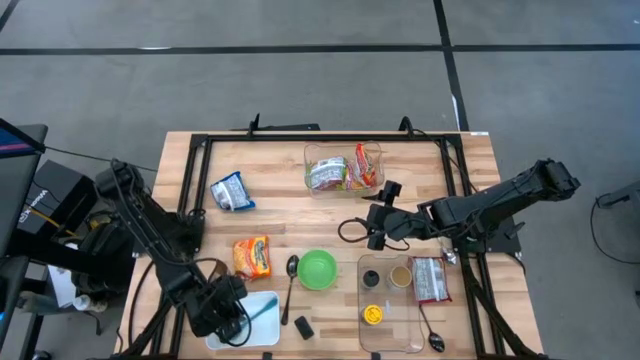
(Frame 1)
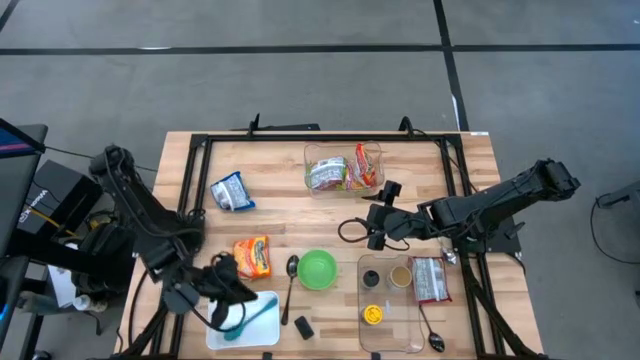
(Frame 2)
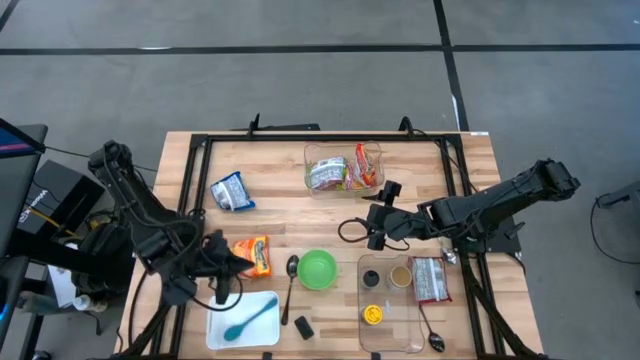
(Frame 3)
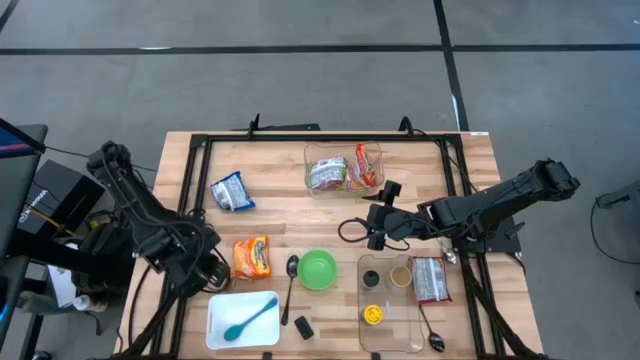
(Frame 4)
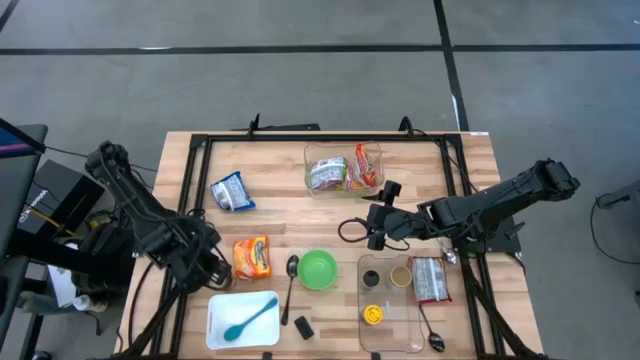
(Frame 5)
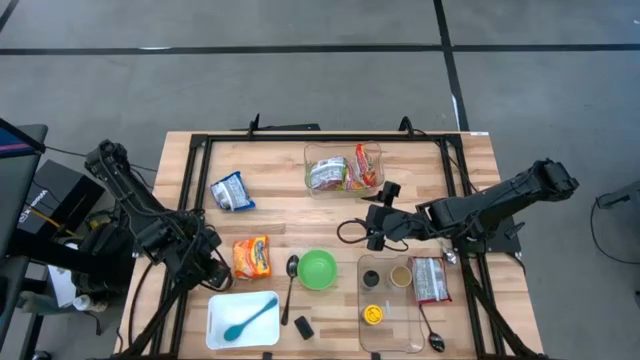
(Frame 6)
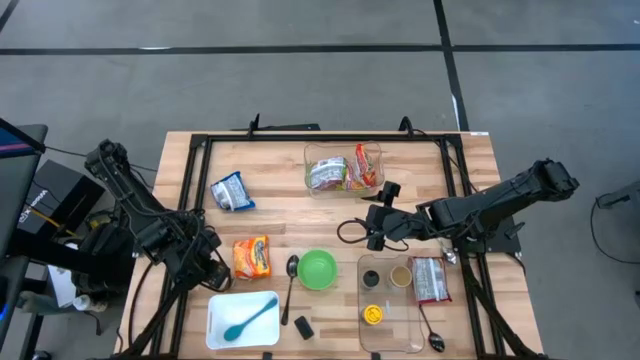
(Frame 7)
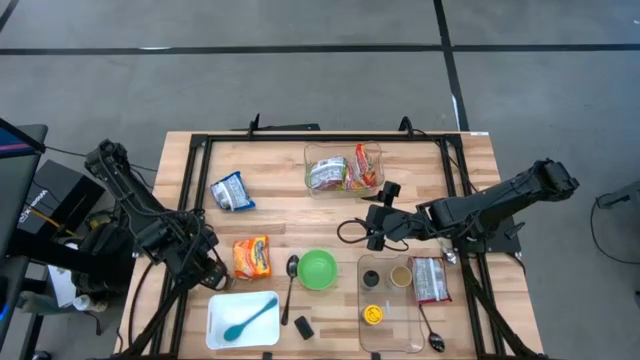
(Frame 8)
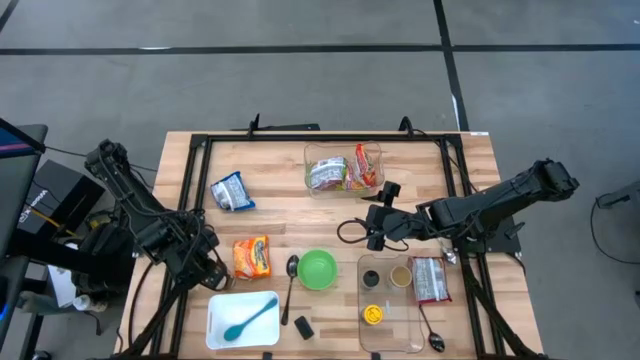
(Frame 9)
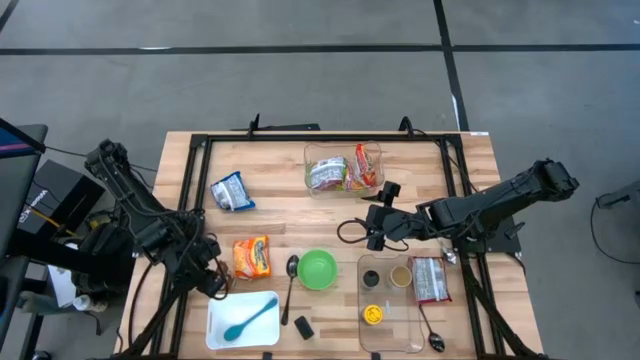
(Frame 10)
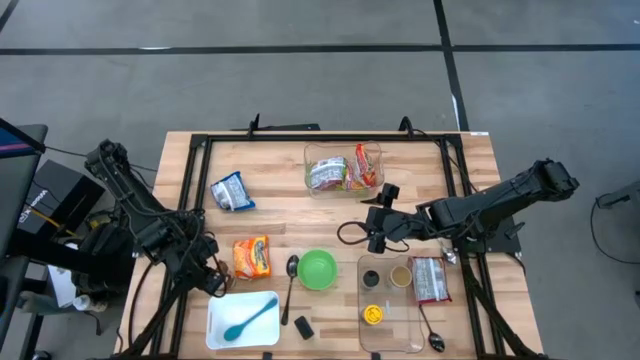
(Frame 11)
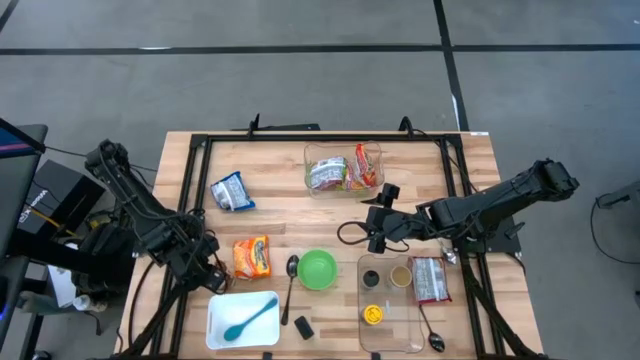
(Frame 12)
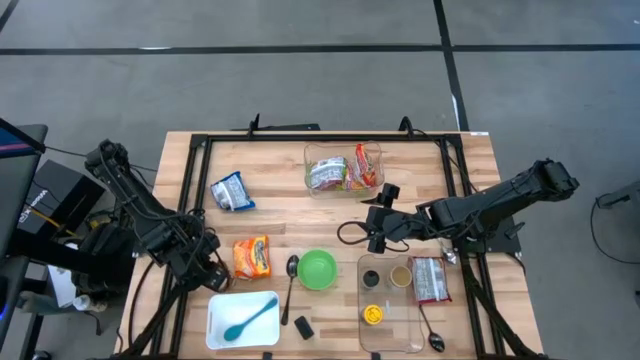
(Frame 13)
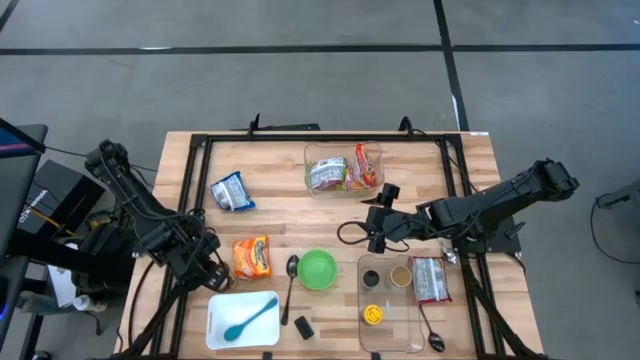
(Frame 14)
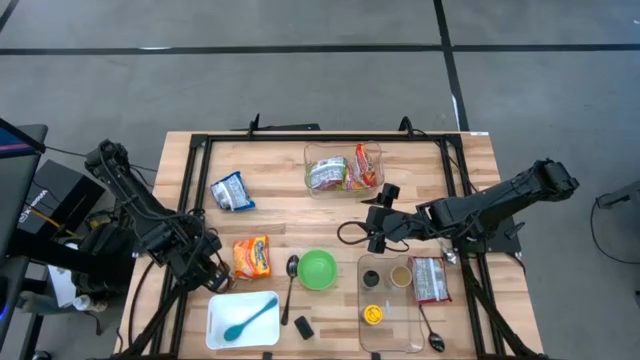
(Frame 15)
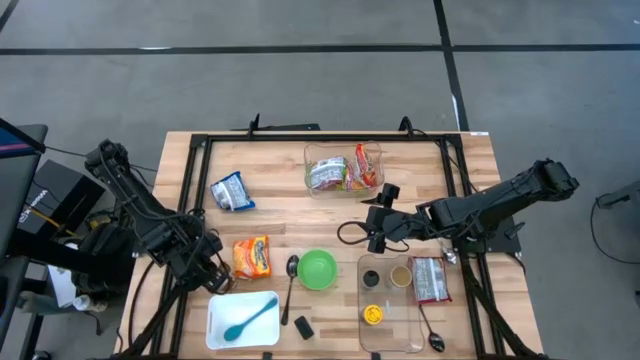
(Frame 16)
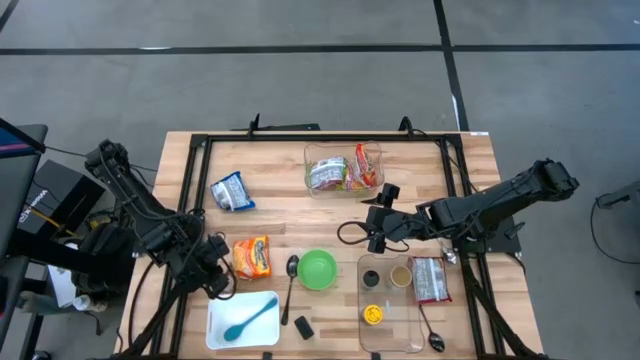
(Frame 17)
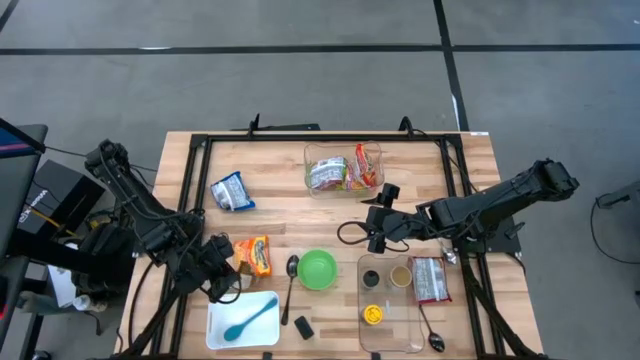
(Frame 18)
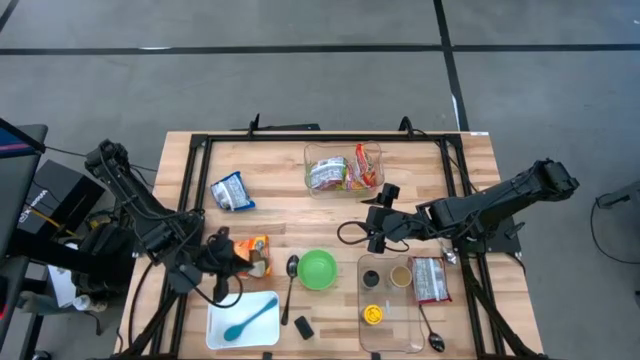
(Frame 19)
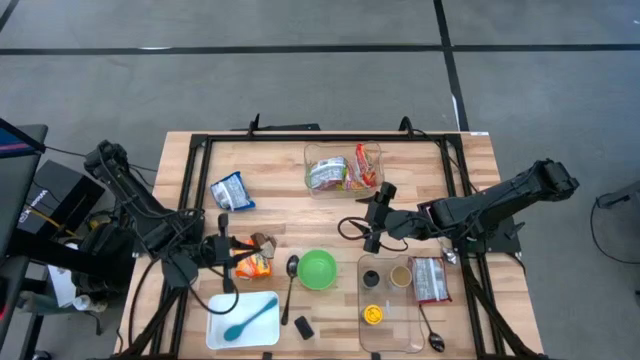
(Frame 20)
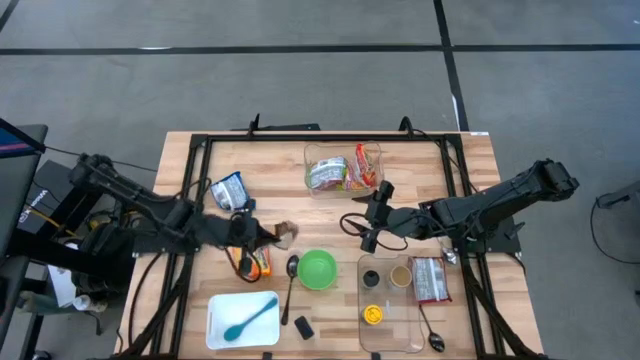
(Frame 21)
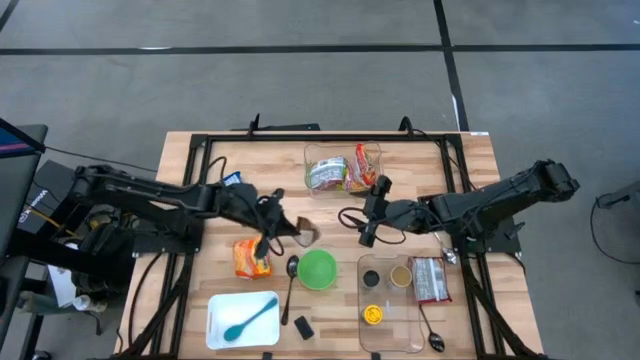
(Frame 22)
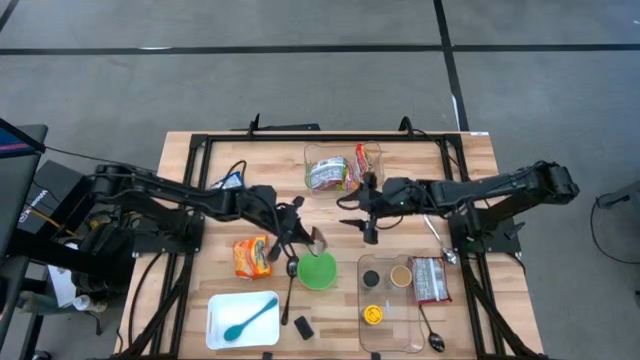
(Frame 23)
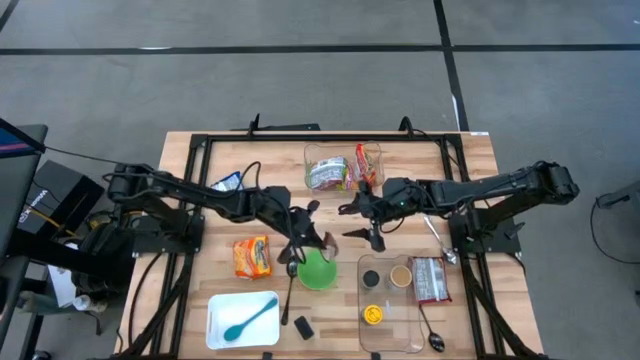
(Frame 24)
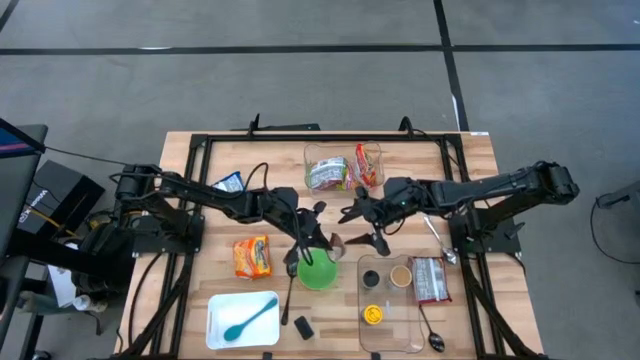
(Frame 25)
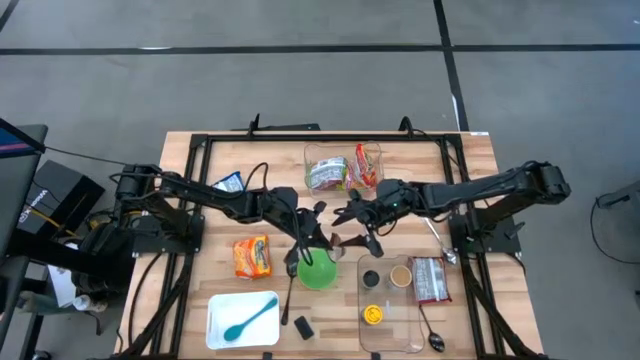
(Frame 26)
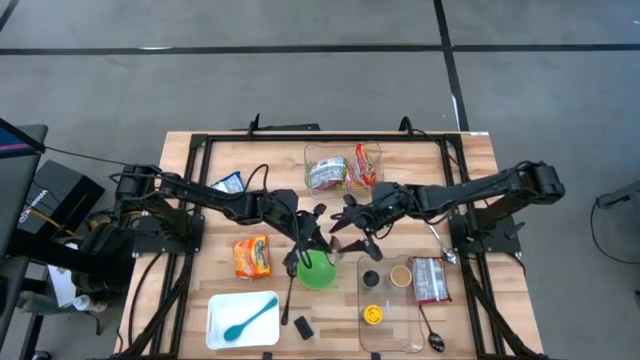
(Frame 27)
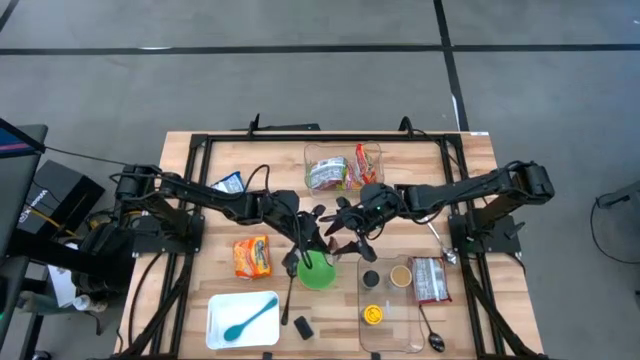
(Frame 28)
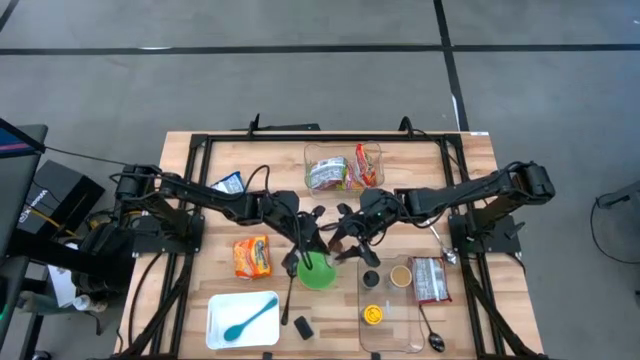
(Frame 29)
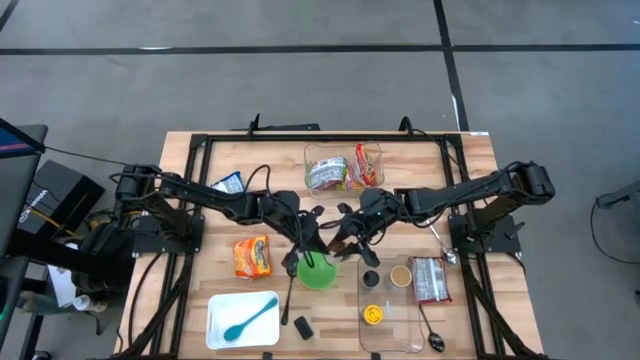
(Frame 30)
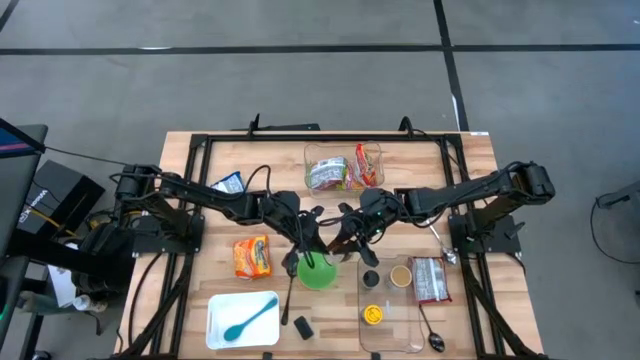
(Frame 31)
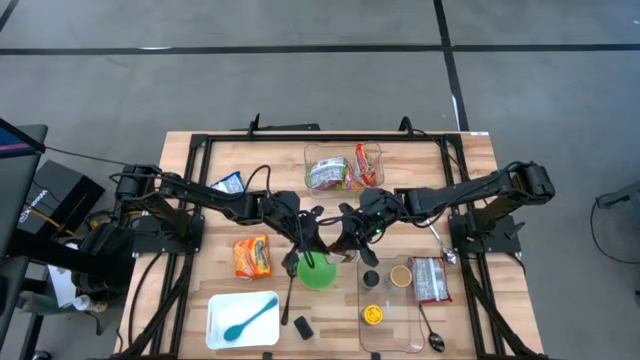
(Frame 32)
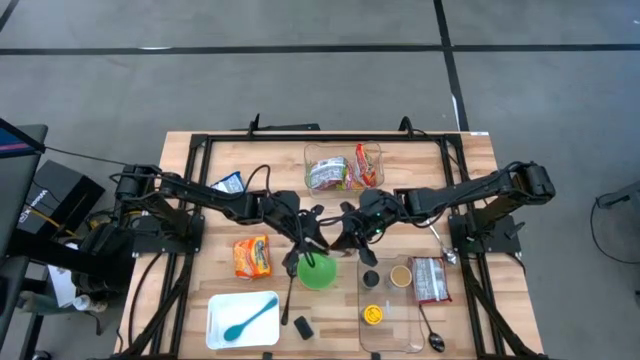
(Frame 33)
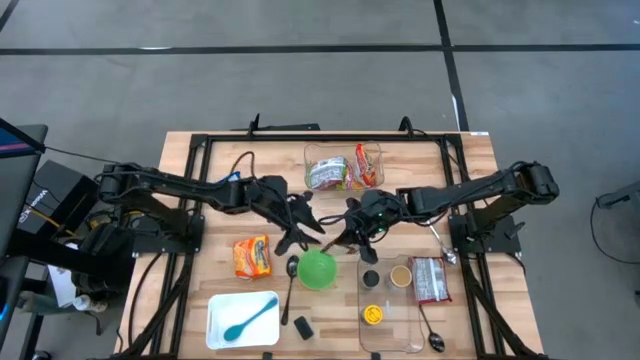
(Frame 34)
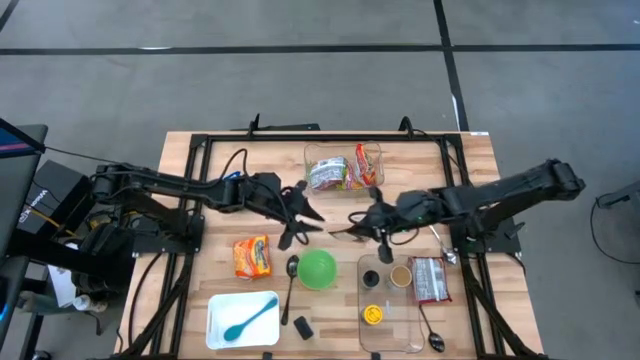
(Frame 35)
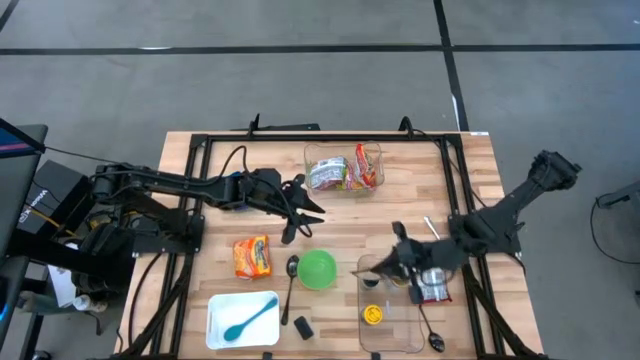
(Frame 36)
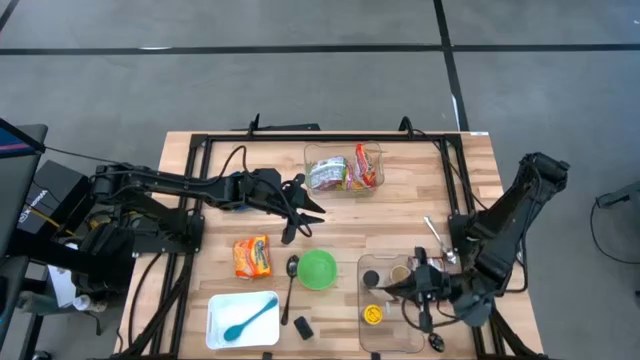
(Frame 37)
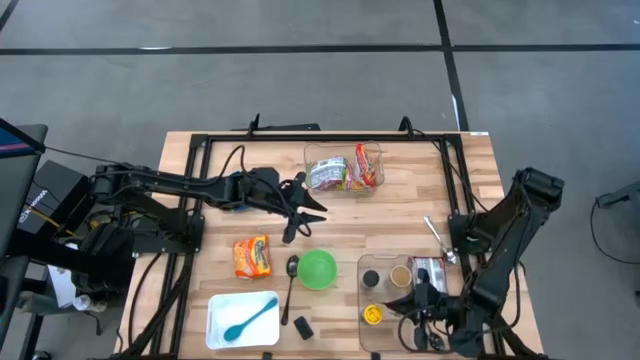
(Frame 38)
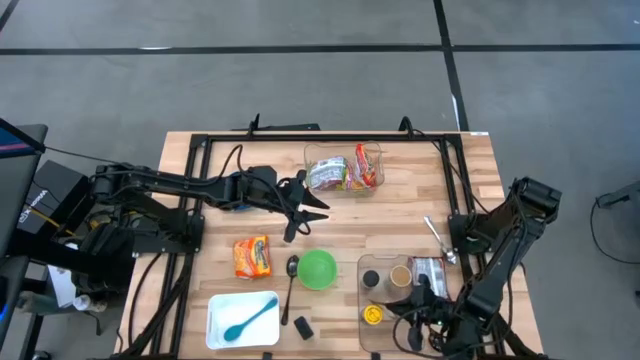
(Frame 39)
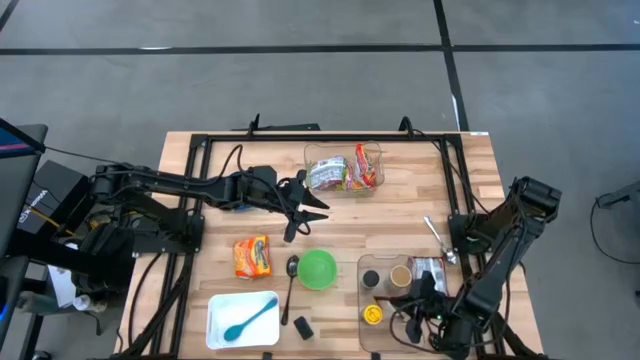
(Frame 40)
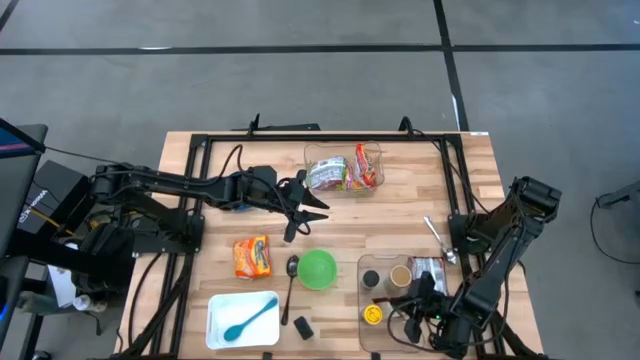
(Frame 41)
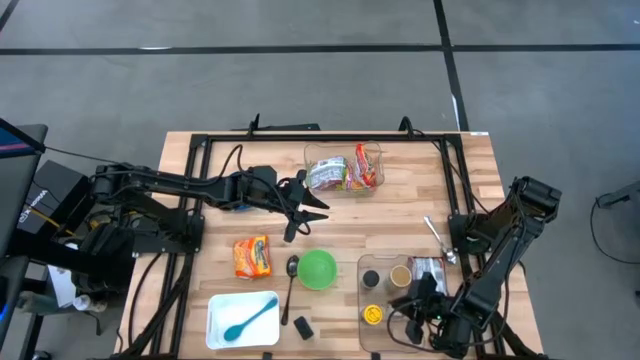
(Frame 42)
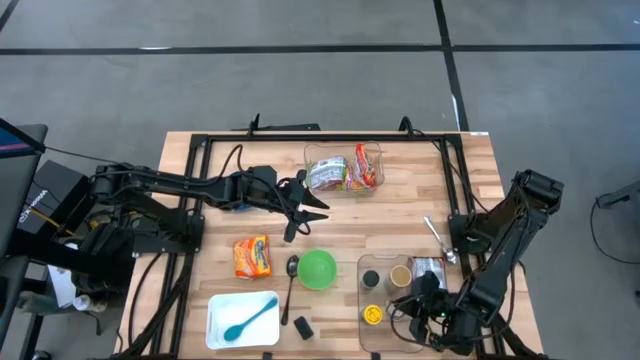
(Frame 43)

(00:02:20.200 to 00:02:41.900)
Task: Pick & Place Food Item
Put the orange seasoning into the bottom transparent bin
